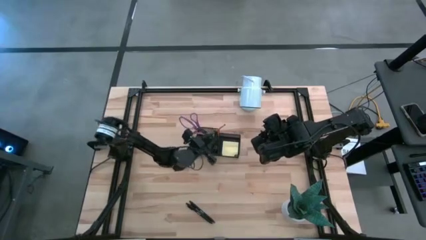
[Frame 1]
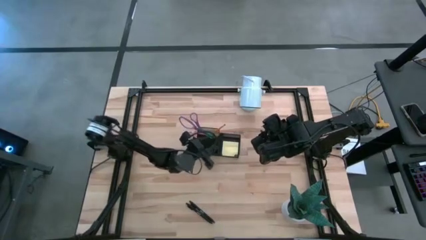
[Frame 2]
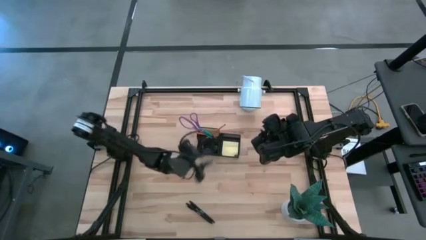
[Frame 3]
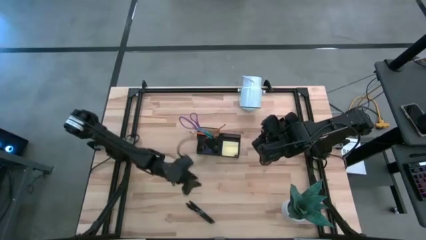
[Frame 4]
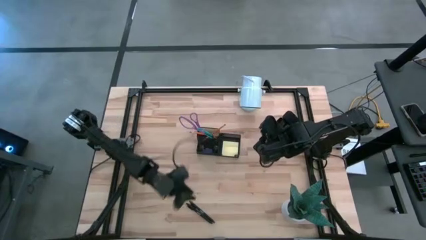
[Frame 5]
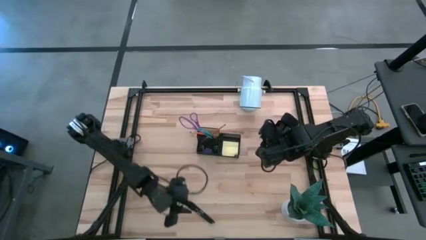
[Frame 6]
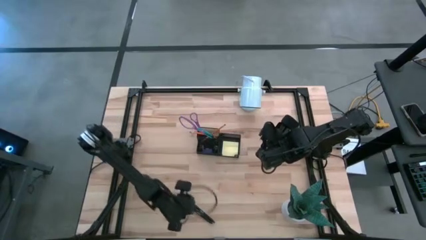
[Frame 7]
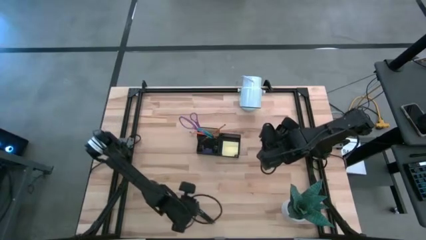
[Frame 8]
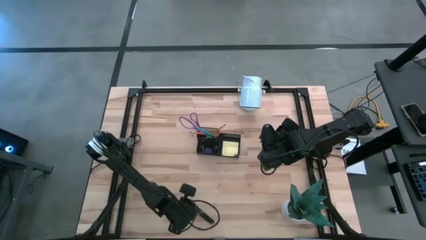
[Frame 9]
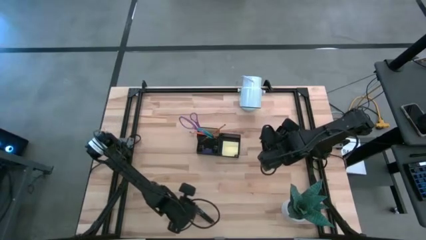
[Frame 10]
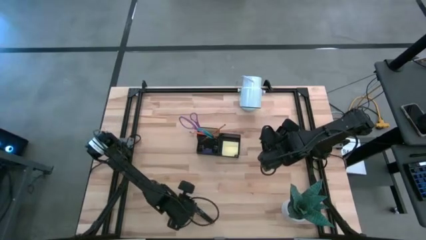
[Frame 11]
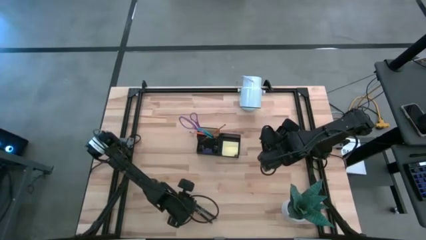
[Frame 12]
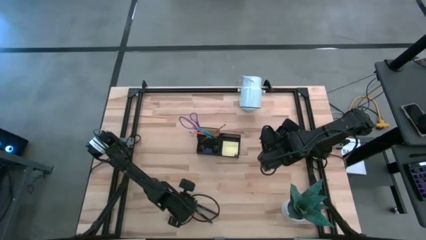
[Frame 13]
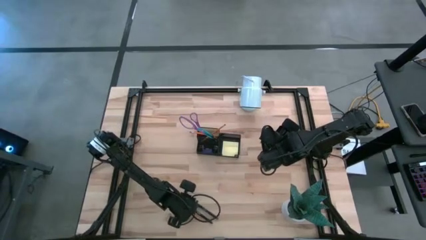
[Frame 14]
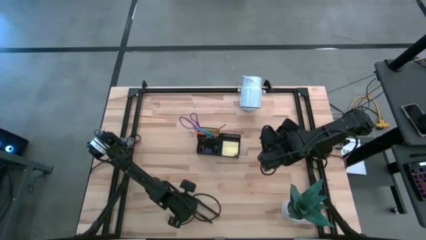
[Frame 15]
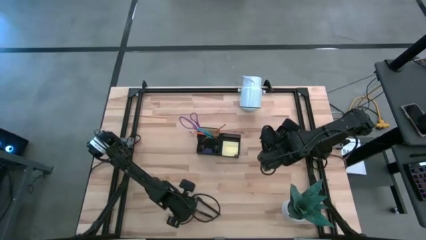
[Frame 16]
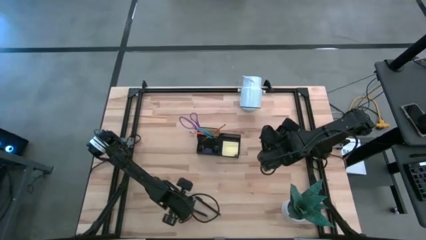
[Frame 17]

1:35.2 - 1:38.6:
Task: Pick and place office supplies into organizer
Put the left black pen into the black desk organizer

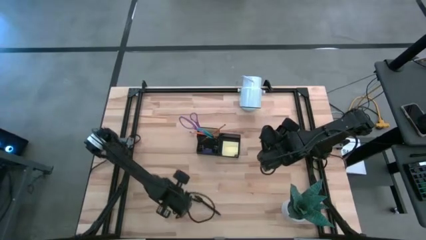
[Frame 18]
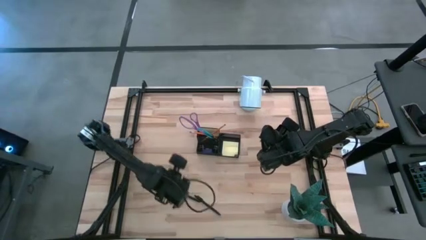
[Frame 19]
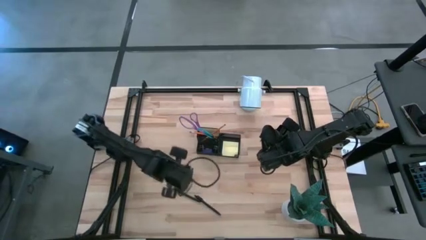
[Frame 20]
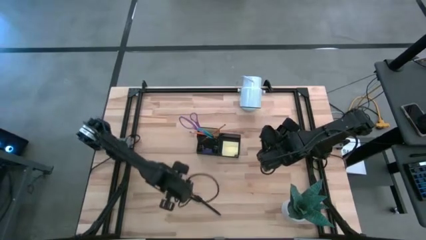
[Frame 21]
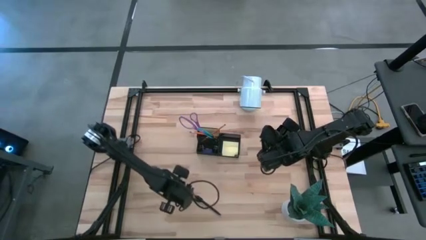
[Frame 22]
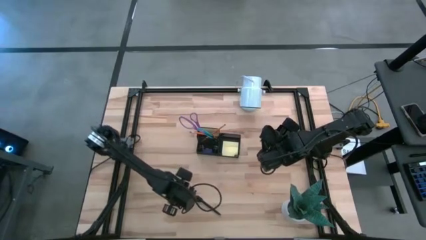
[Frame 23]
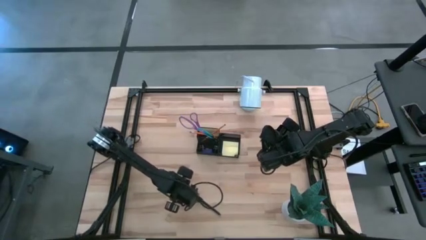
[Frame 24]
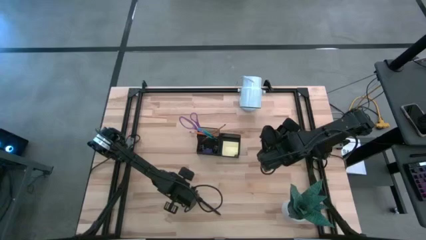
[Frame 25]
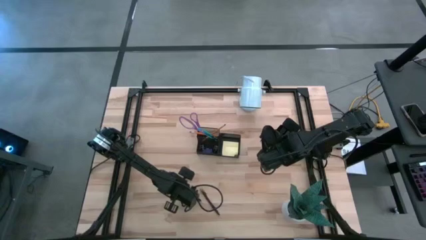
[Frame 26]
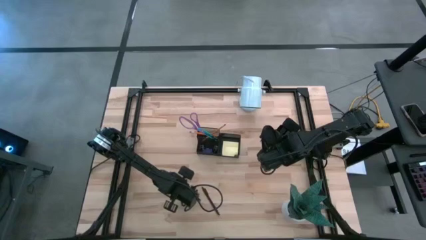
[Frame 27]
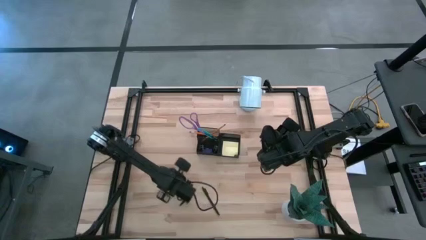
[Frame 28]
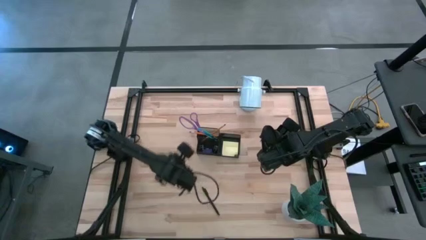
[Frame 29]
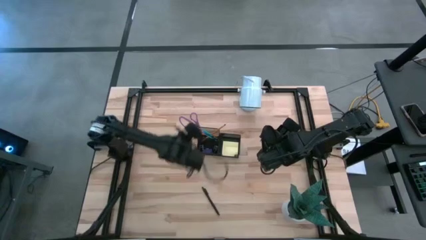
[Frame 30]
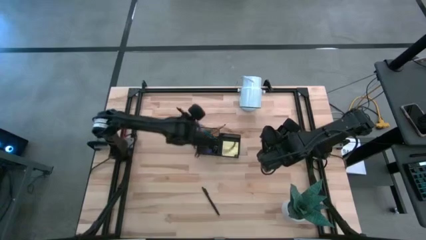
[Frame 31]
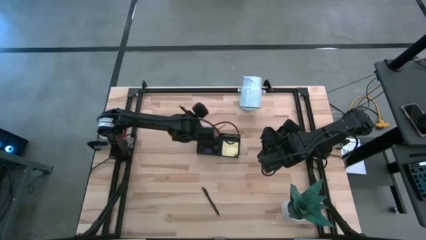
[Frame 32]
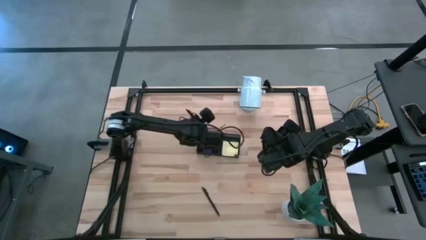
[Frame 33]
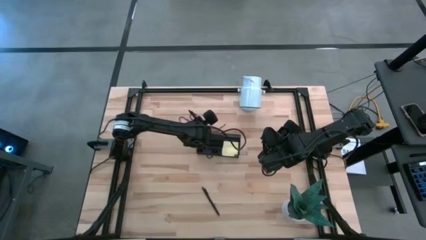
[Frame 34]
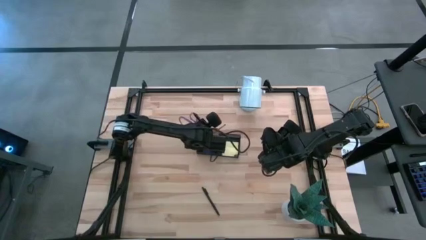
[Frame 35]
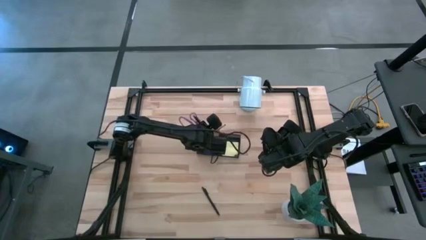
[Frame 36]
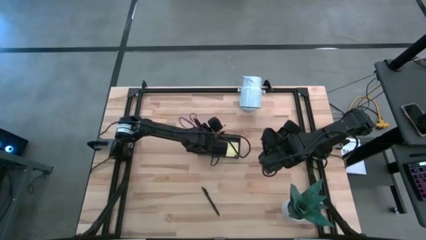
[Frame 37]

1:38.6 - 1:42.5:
Put the left black pen into the black desk organizer

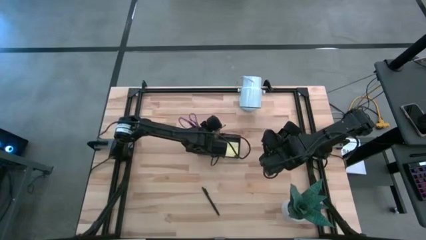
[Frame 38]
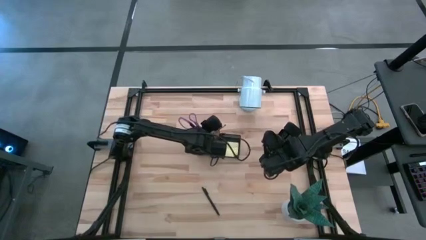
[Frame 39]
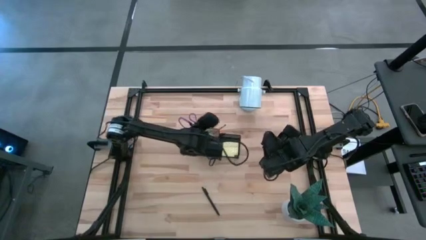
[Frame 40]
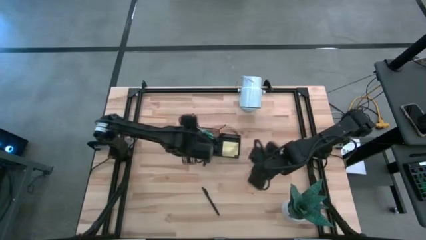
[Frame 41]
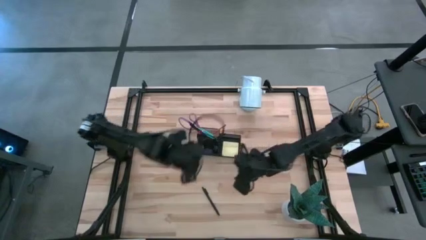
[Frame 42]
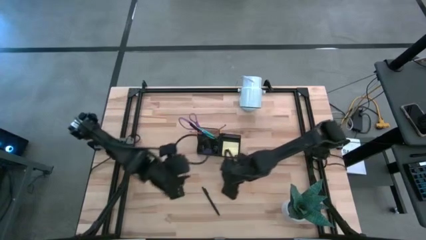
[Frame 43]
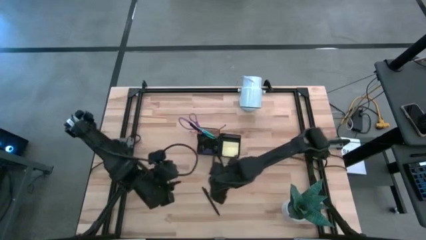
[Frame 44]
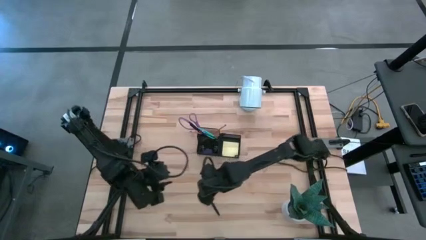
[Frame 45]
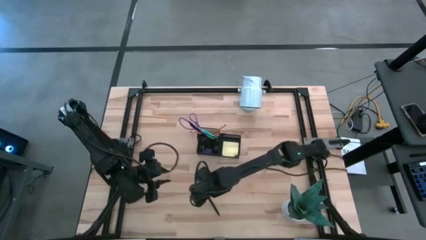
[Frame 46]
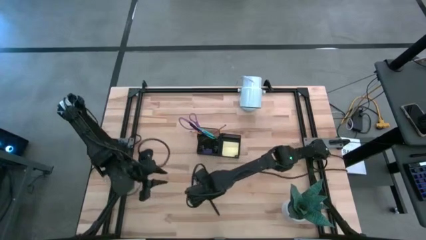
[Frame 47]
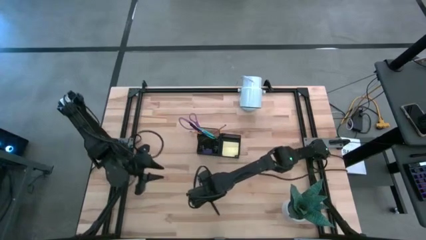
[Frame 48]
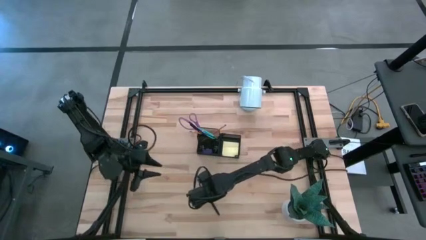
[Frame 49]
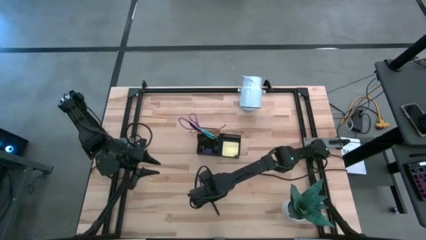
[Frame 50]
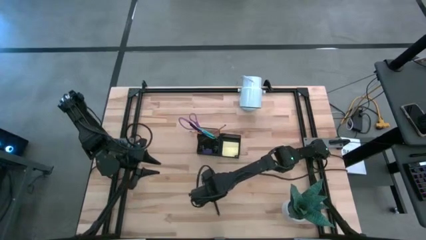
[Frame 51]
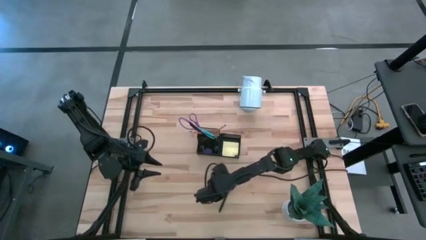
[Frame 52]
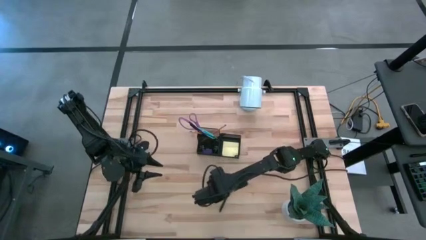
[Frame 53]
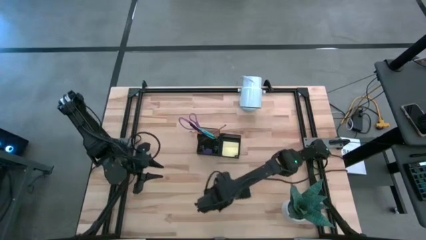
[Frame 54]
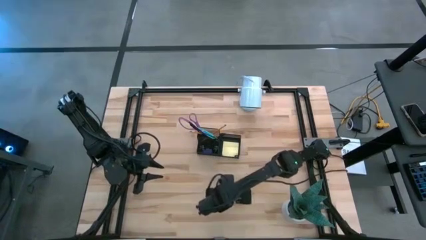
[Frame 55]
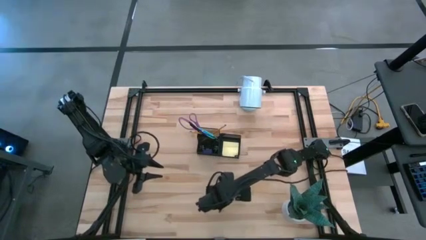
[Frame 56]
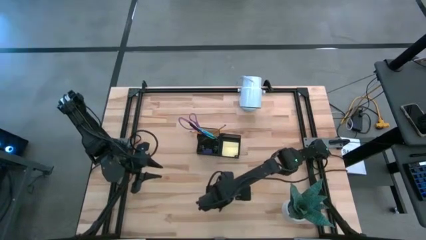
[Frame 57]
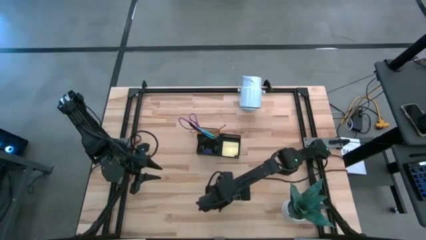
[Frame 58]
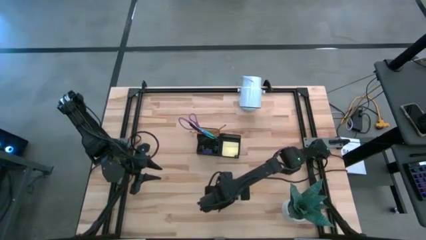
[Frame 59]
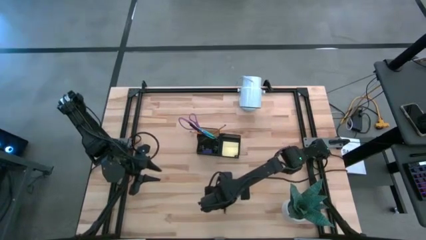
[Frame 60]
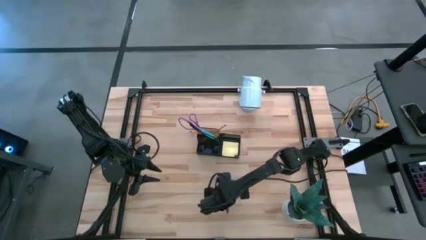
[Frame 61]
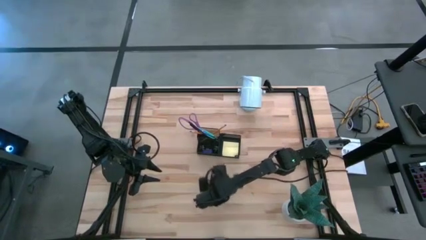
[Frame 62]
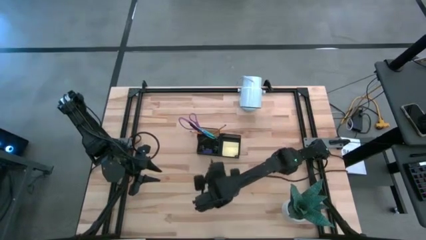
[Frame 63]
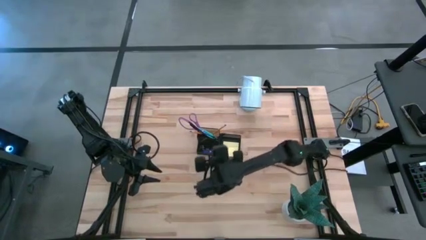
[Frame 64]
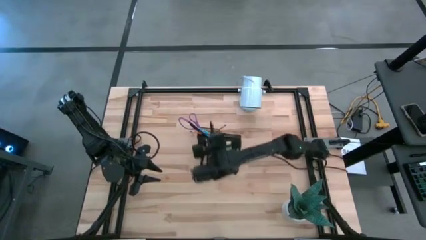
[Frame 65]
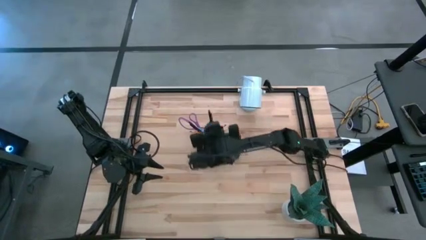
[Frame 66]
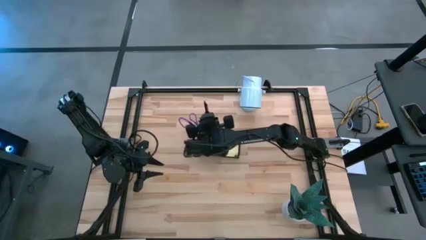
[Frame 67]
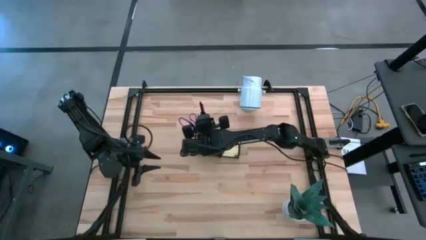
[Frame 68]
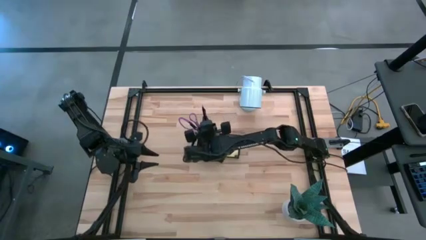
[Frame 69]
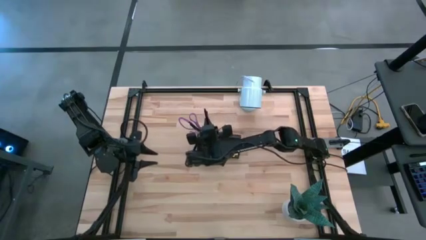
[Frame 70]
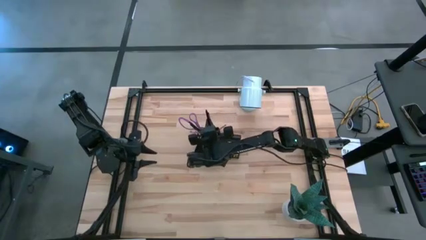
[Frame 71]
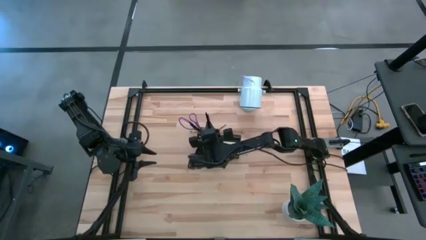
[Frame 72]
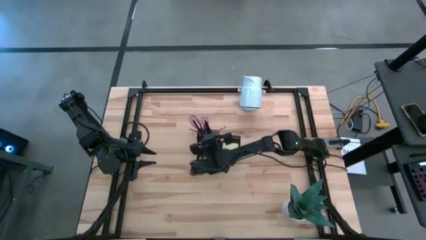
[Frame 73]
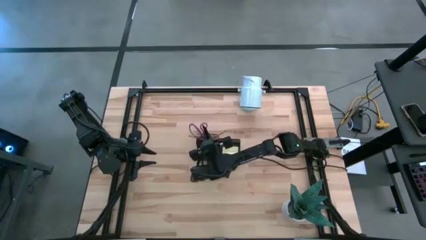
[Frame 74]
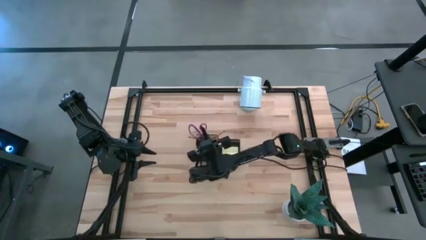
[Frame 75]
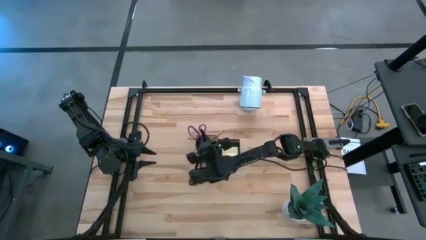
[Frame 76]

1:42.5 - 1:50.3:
Put the black pen into the black desk organizer
